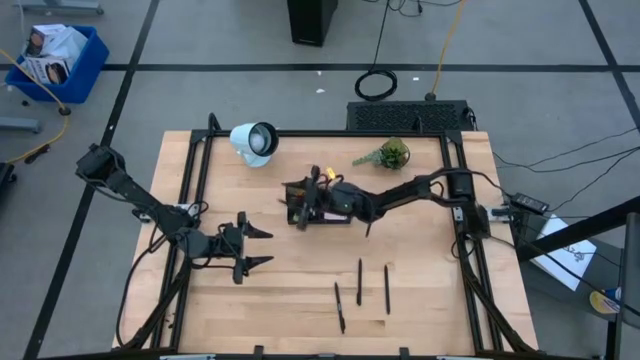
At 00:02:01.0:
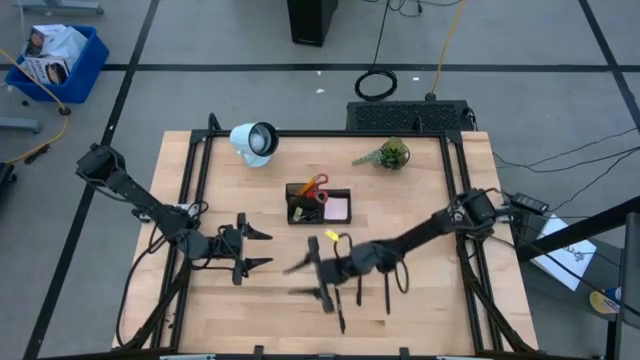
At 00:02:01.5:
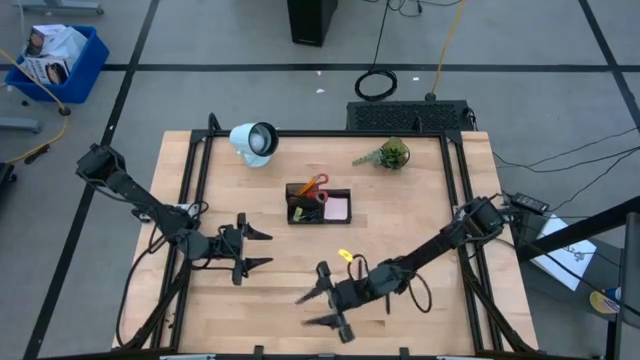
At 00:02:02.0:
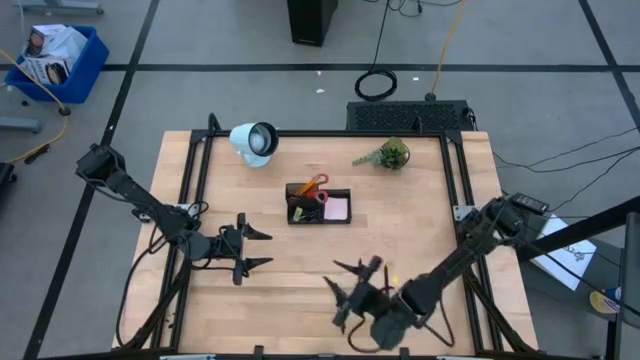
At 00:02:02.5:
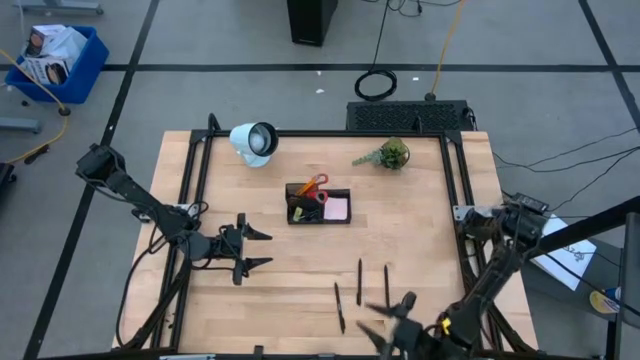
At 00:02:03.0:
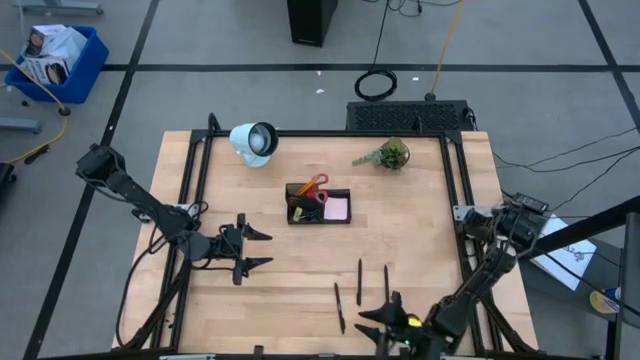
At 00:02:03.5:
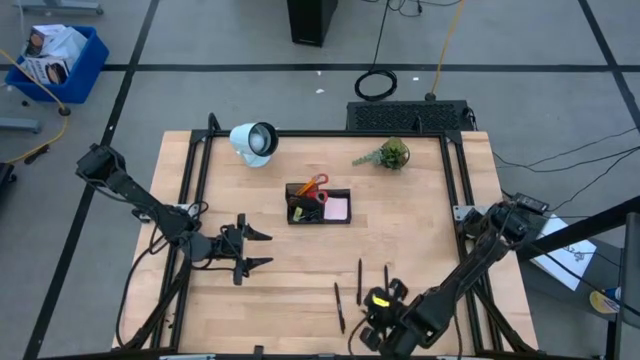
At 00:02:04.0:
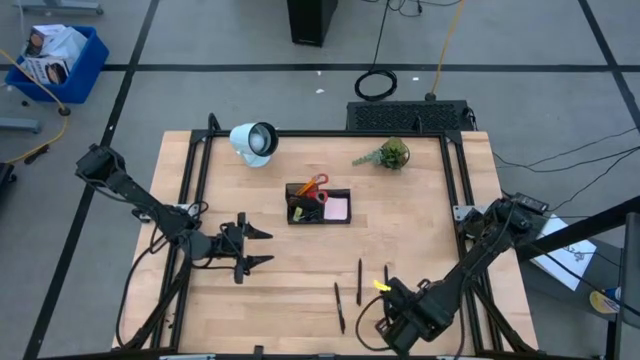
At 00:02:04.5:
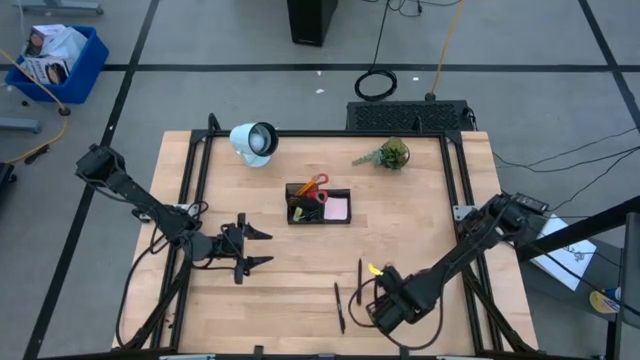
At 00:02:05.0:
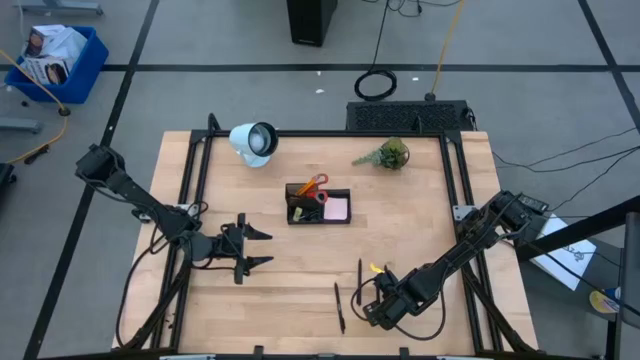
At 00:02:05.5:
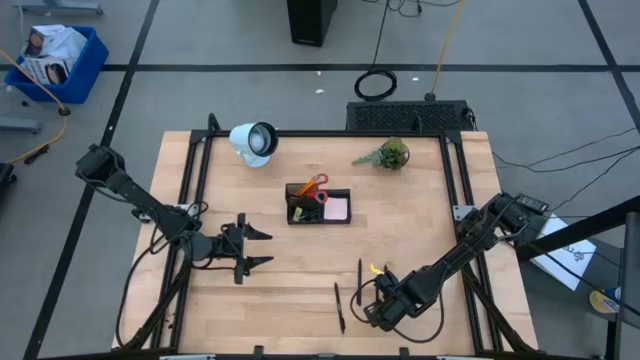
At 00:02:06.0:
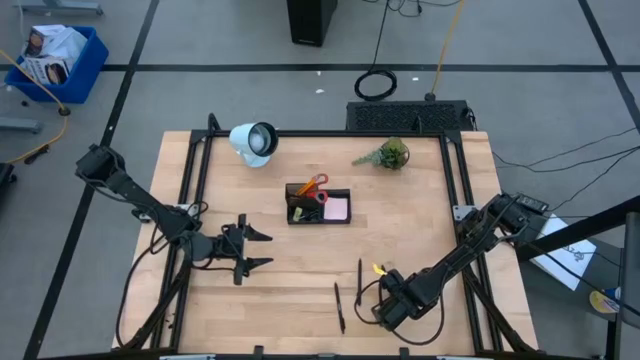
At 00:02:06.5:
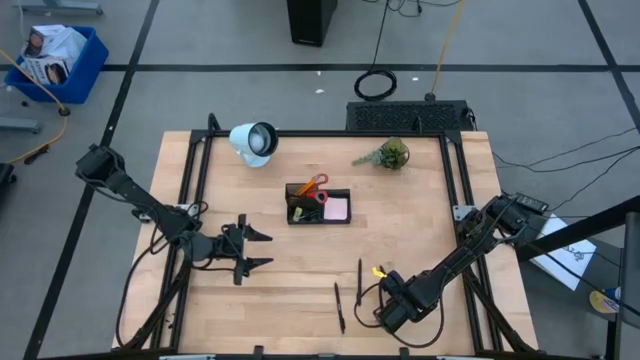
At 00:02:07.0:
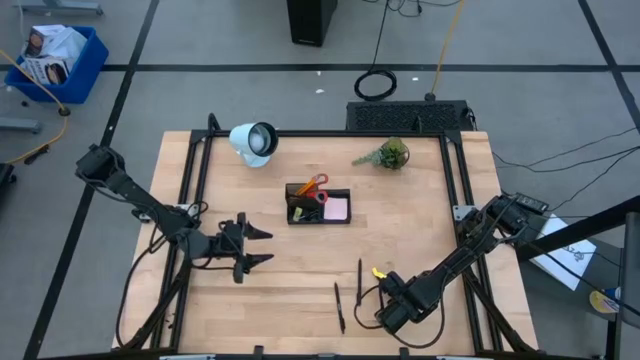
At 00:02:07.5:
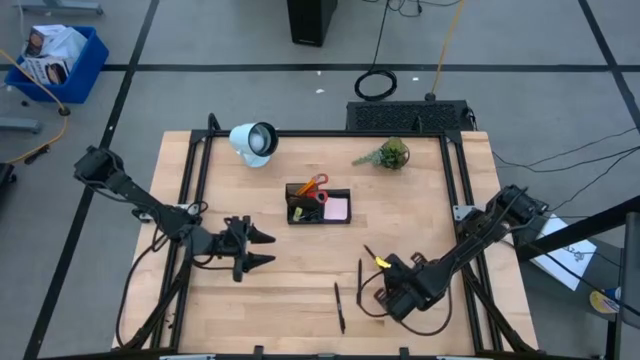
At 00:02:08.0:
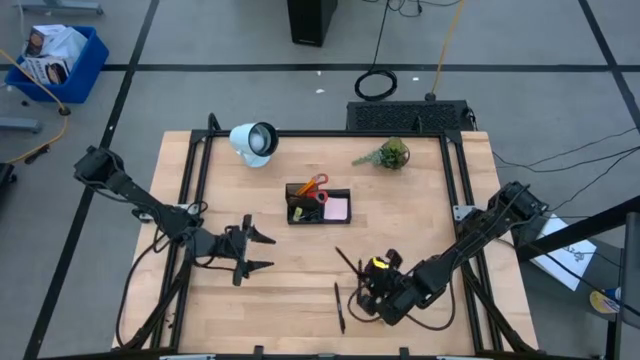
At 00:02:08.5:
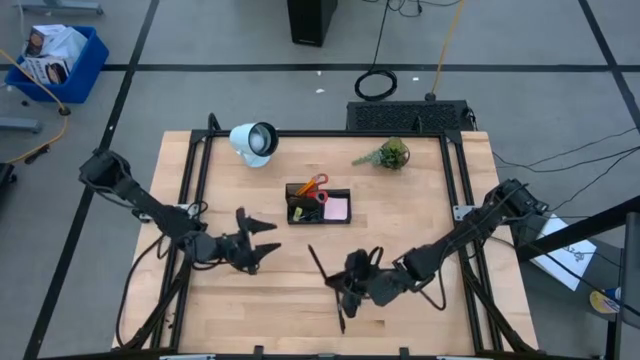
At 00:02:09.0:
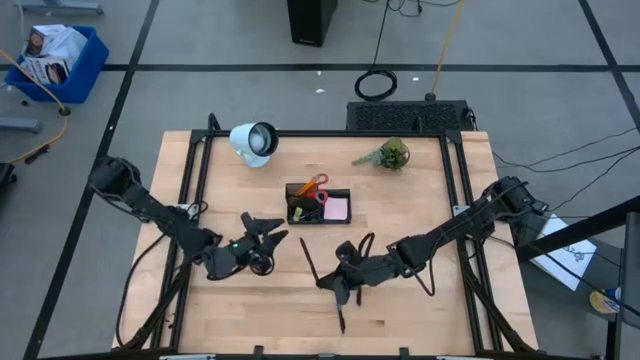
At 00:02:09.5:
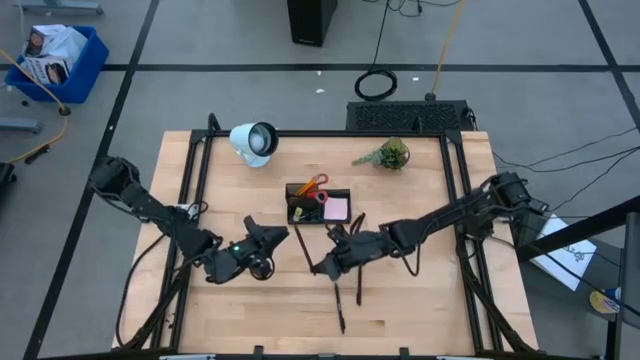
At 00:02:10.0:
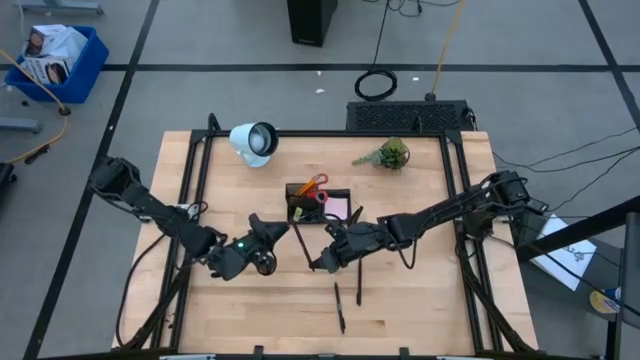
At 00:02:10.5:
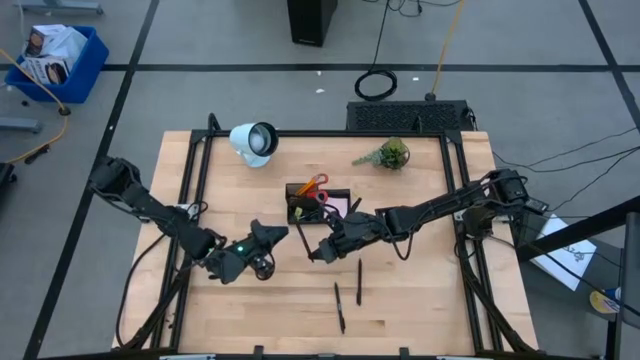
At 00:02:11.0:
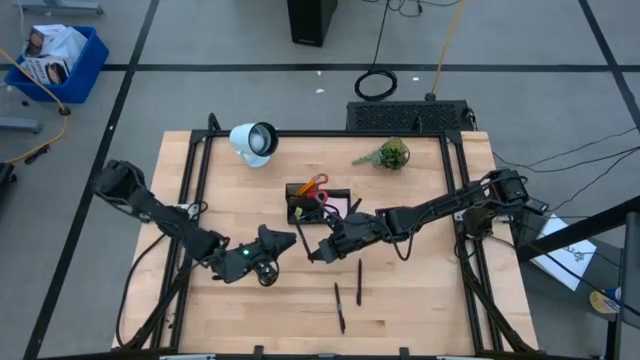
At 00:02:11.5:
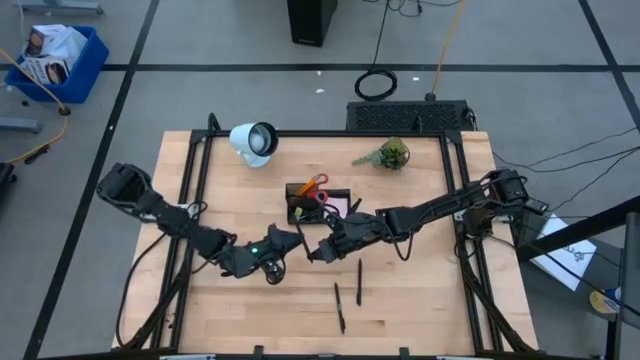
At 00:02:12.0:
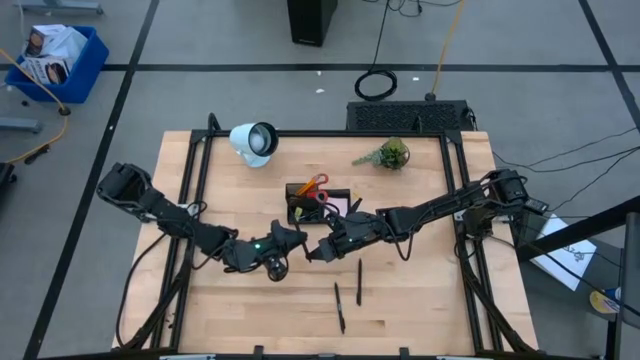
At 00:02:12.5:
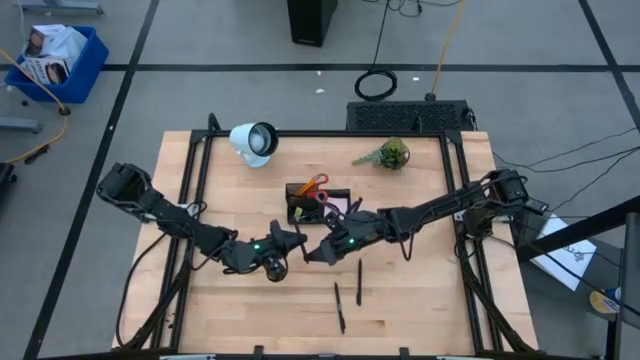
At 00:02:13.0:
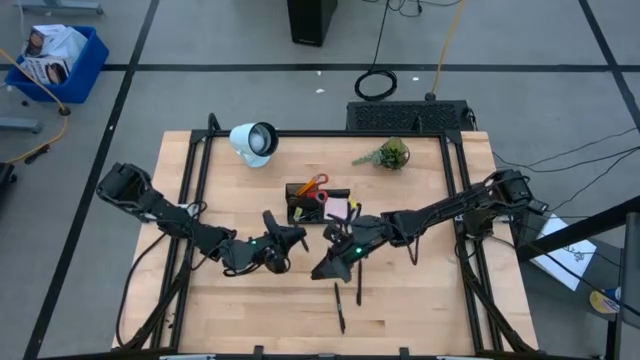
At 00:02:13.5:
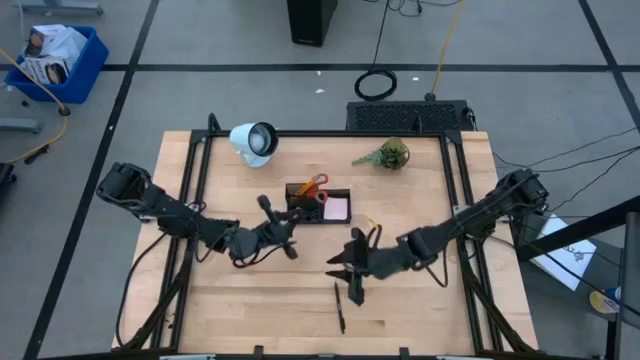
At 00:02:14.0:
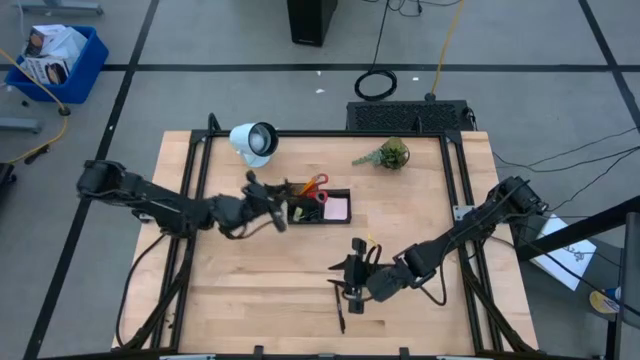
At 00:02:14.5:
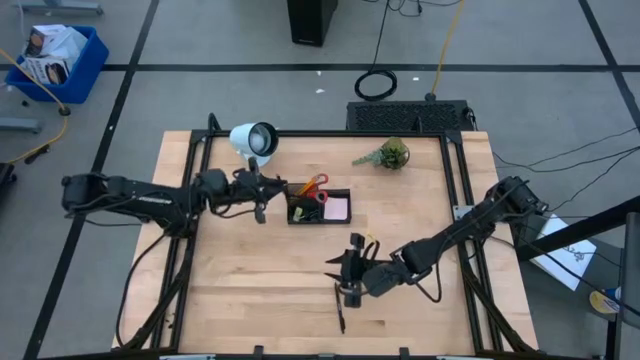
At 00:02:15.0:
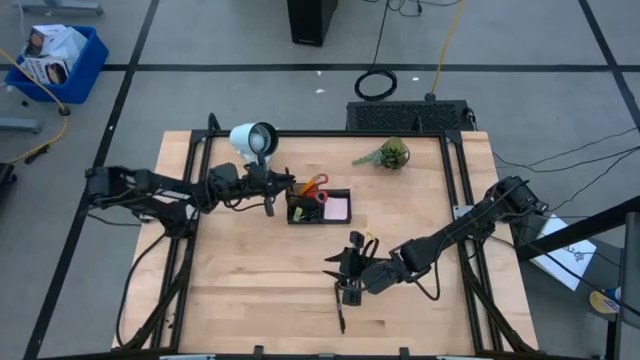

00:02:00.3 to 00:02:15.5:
Task: Pick and place office supplies into organizer
Put the black pen into the black desk organizer

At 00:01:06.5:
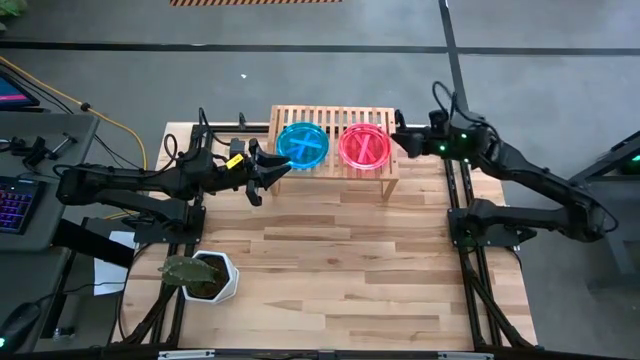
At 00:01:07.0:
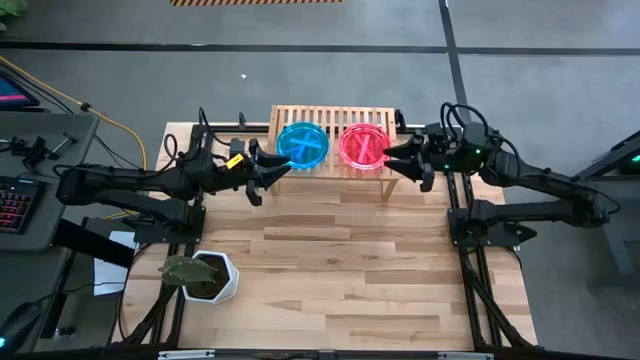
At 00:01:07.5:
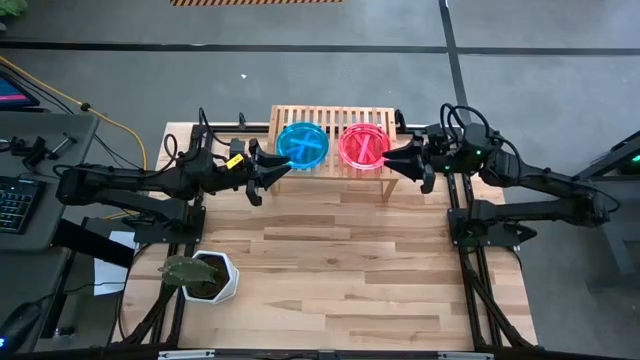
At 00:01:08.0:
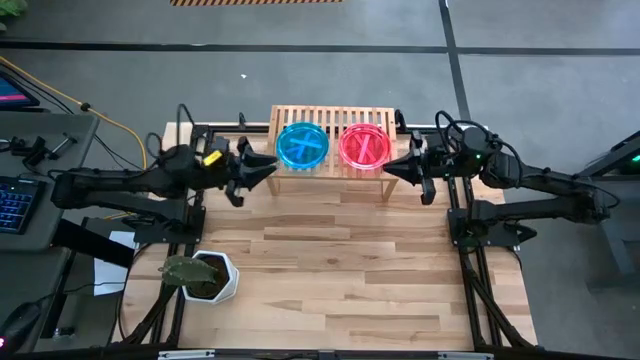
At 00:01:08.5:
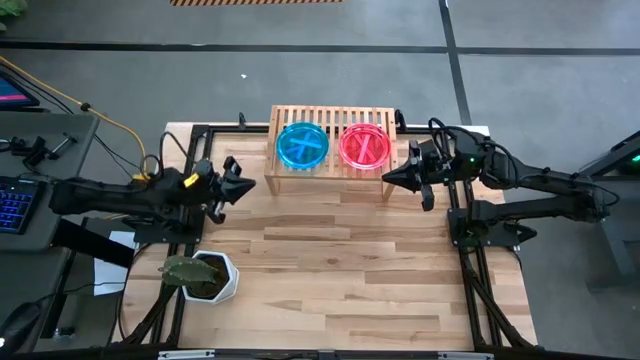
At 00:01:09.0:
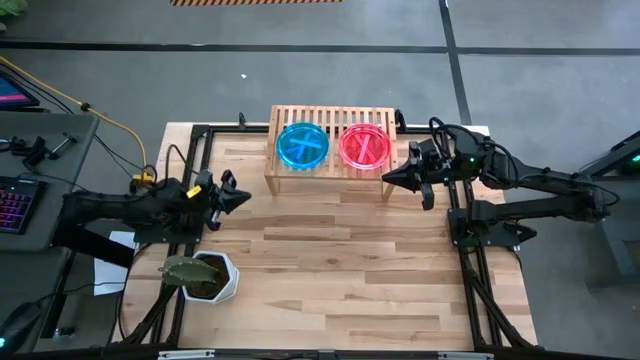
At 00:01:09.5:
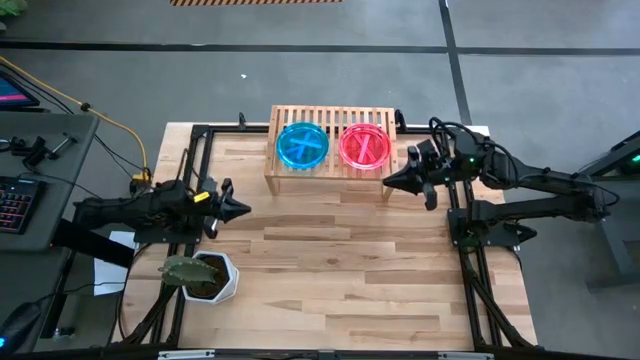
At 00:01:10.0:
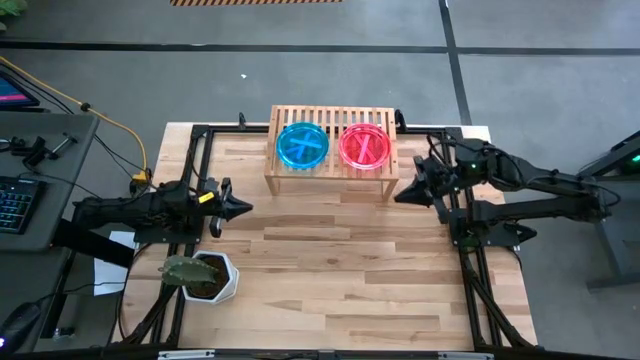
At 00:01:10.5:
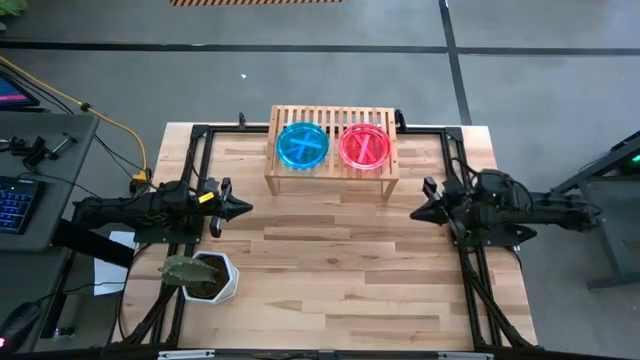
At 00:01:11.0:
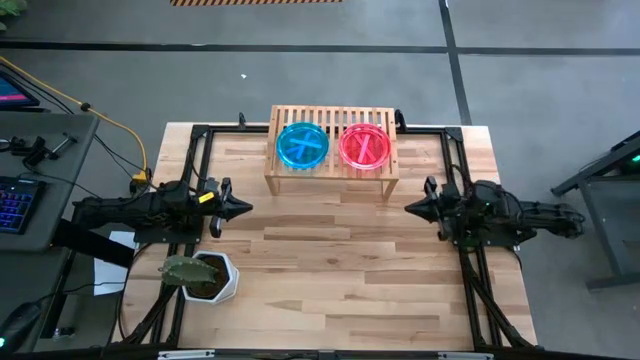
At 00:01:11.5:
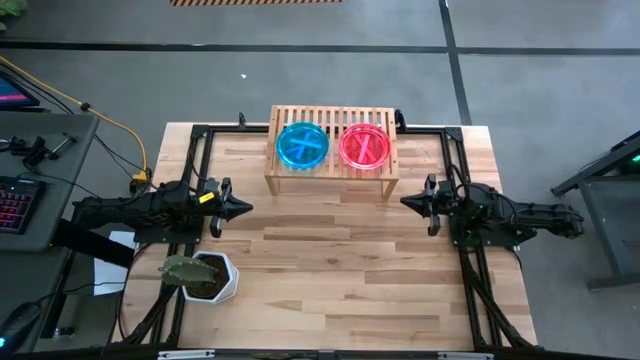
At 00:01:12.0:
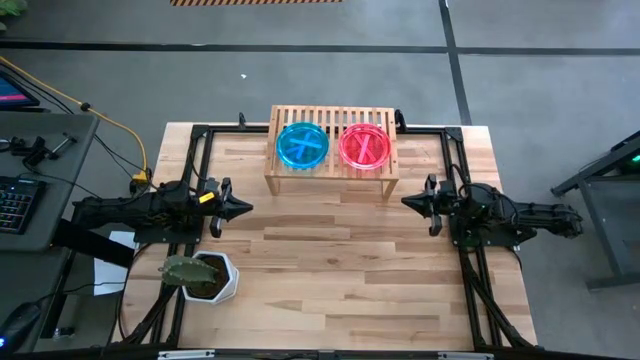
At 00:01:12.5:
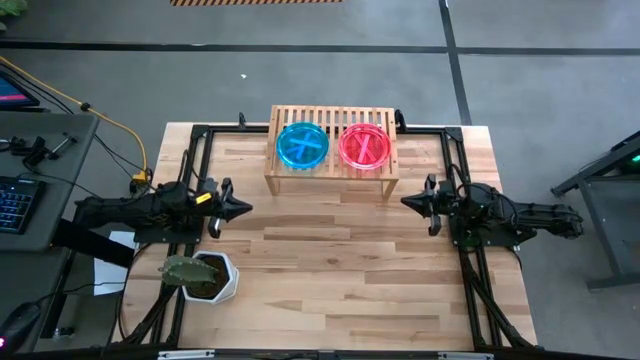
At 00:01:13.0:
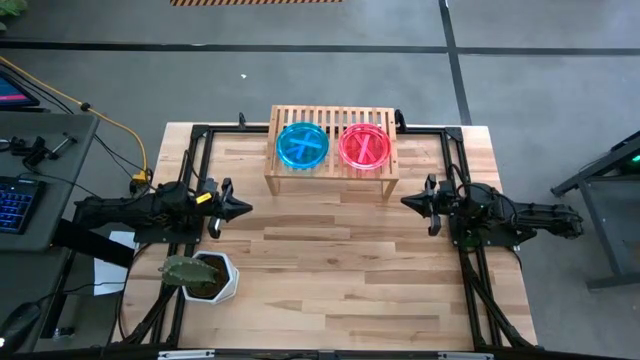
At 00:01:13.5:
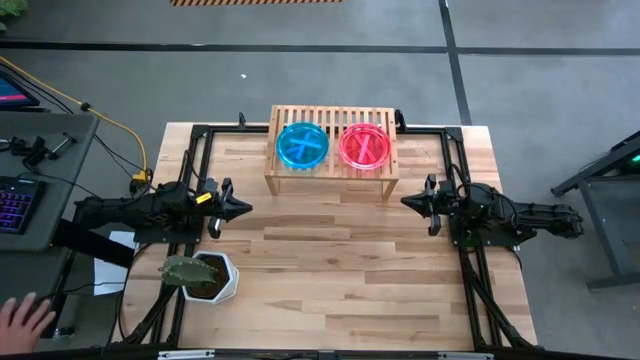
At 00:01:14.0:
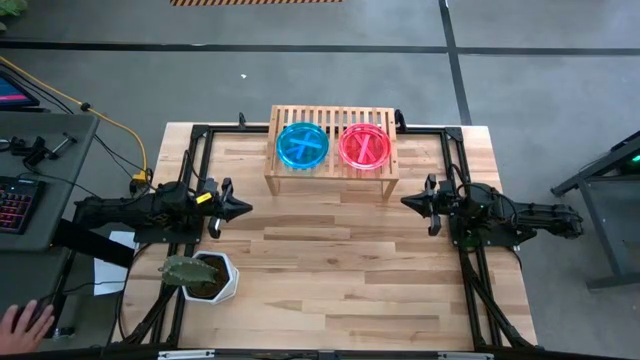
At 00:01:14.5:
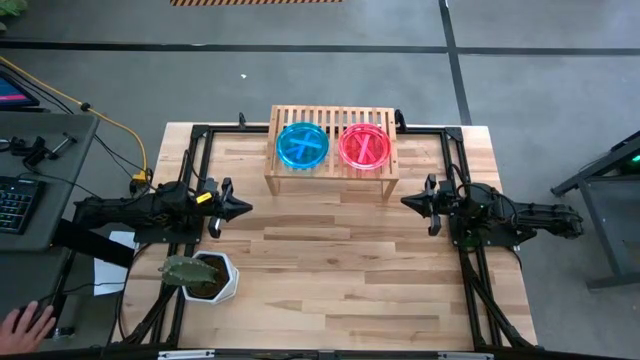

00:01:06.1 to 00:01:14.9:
Task: Place and stack plates onto a shelf
Return to Home Position
